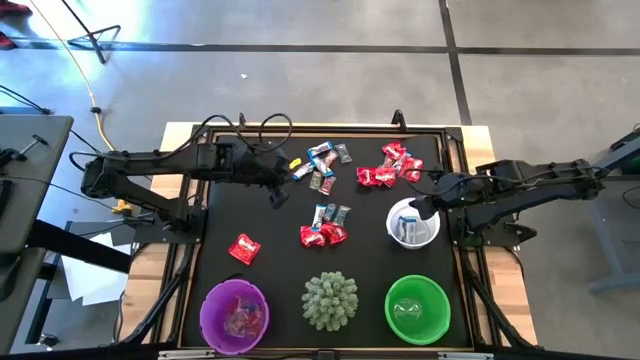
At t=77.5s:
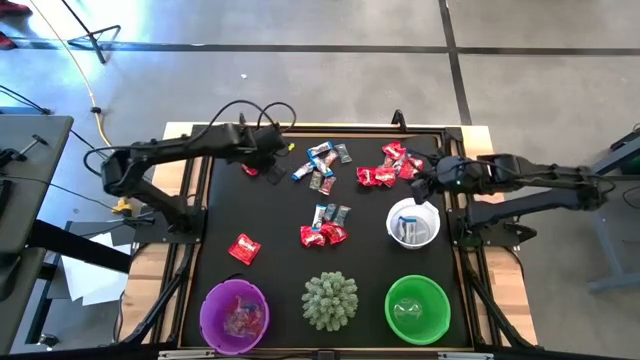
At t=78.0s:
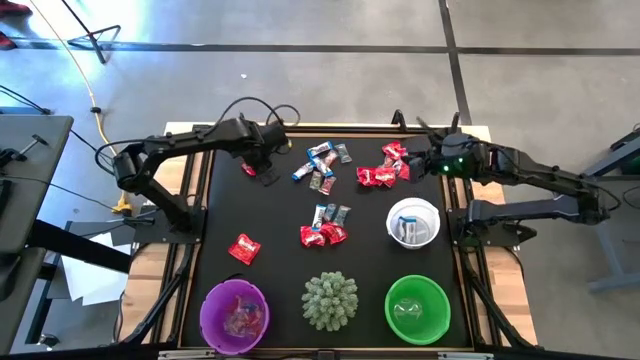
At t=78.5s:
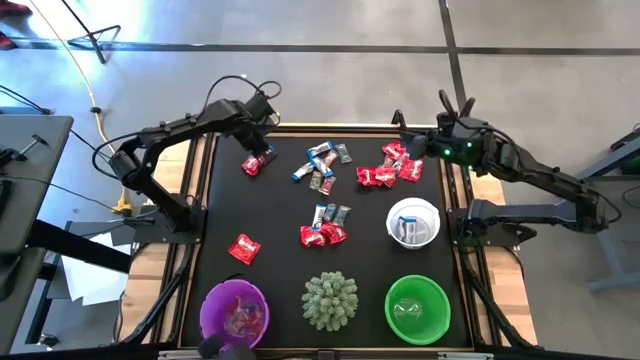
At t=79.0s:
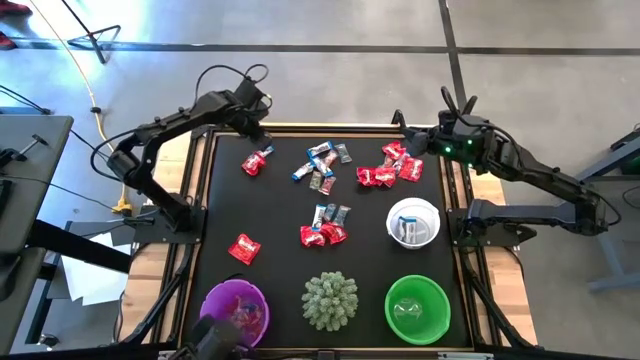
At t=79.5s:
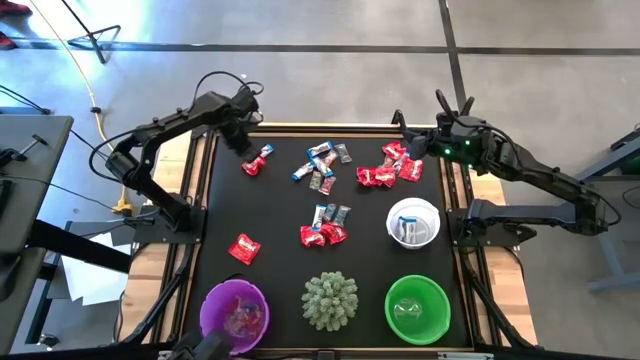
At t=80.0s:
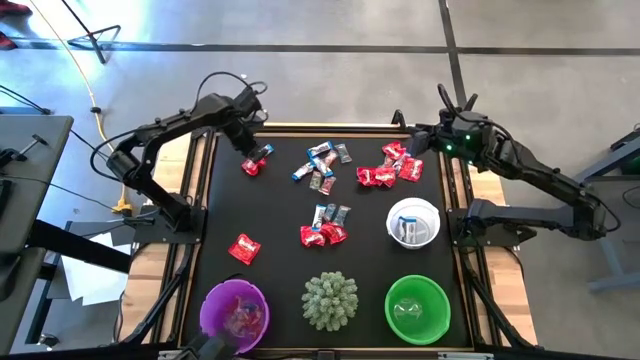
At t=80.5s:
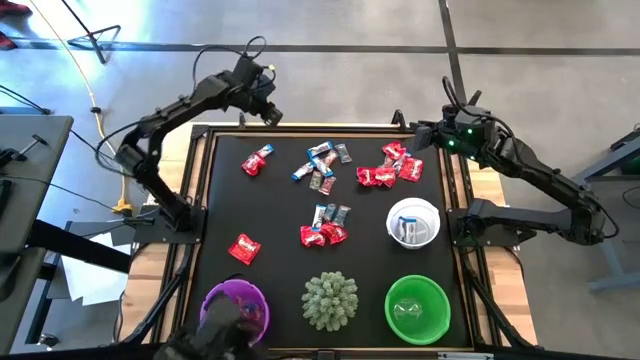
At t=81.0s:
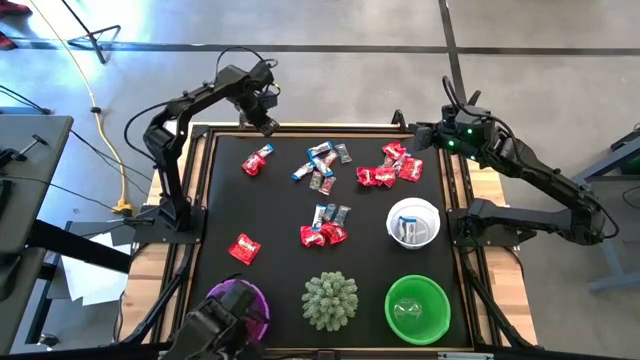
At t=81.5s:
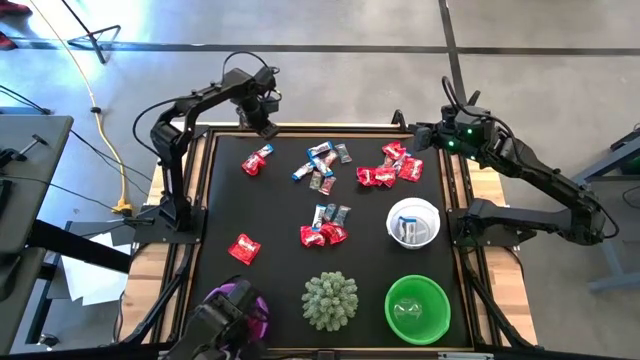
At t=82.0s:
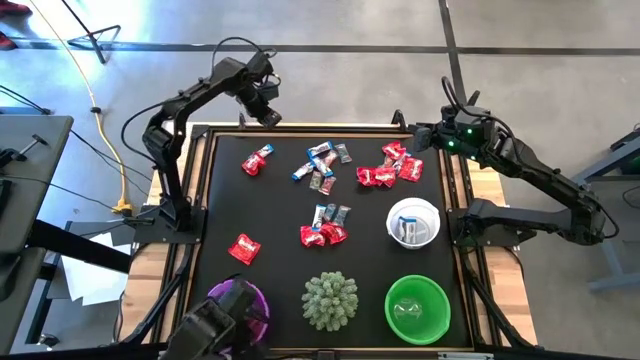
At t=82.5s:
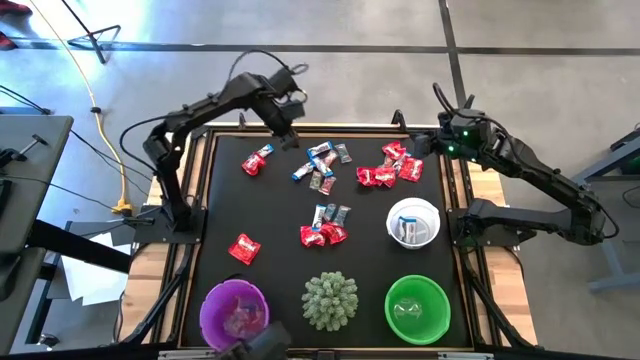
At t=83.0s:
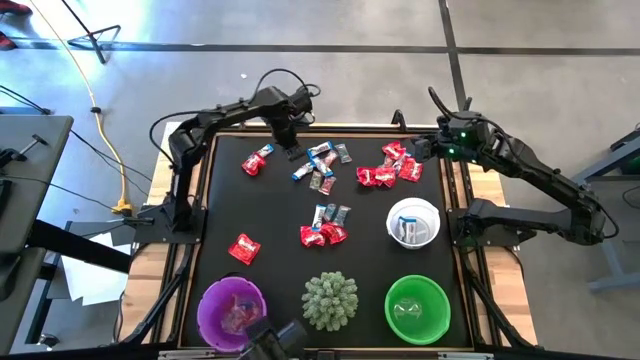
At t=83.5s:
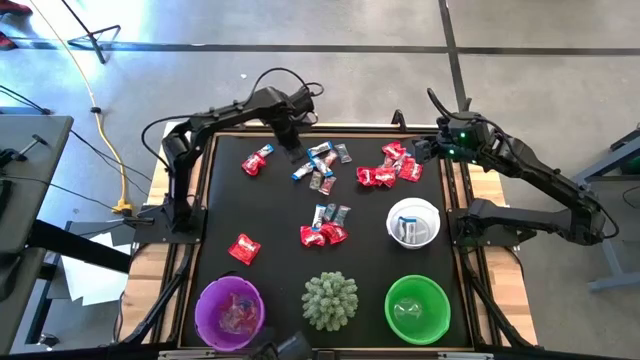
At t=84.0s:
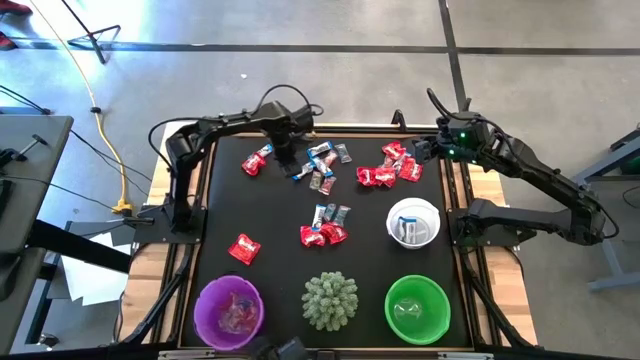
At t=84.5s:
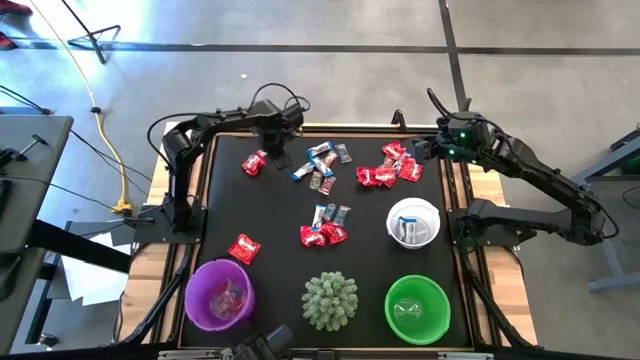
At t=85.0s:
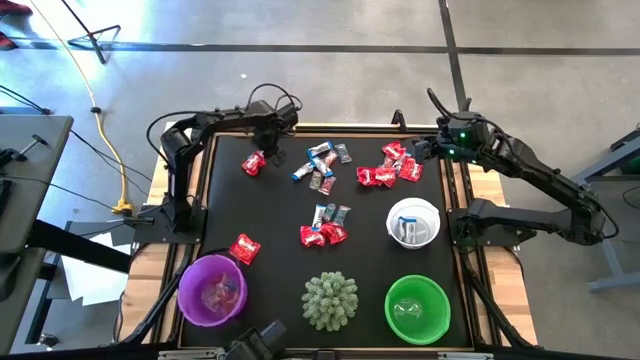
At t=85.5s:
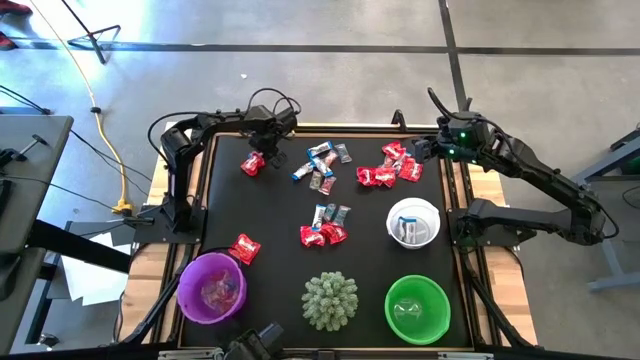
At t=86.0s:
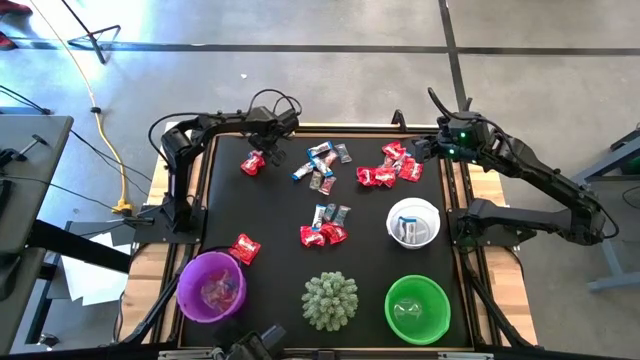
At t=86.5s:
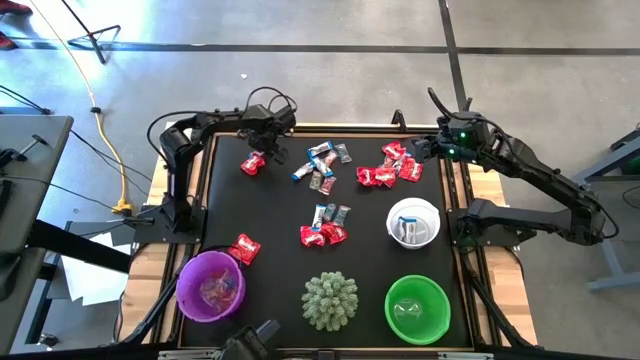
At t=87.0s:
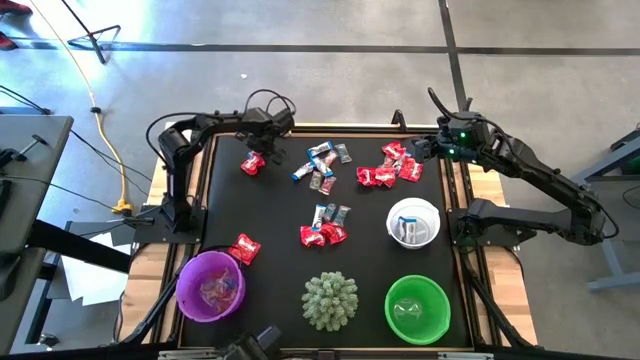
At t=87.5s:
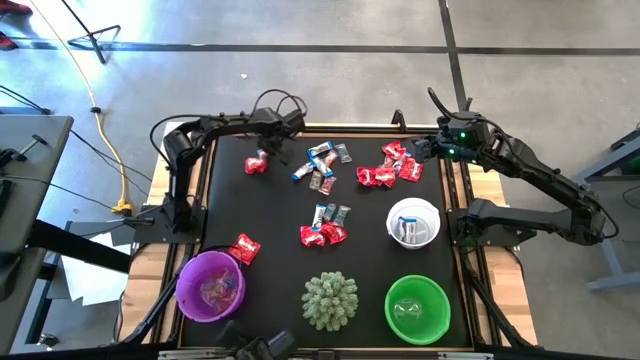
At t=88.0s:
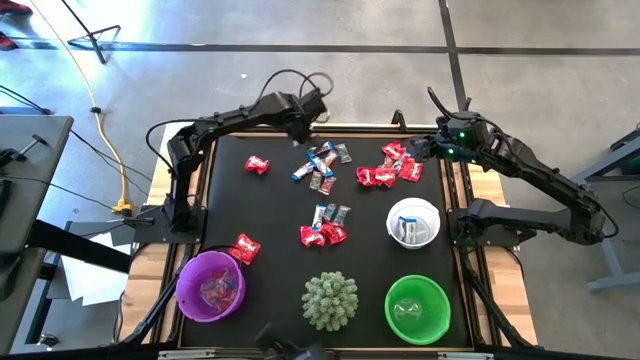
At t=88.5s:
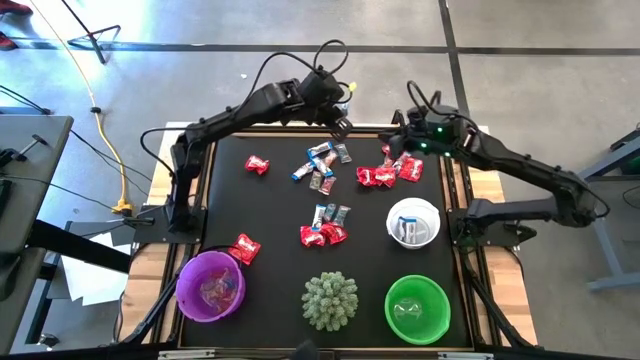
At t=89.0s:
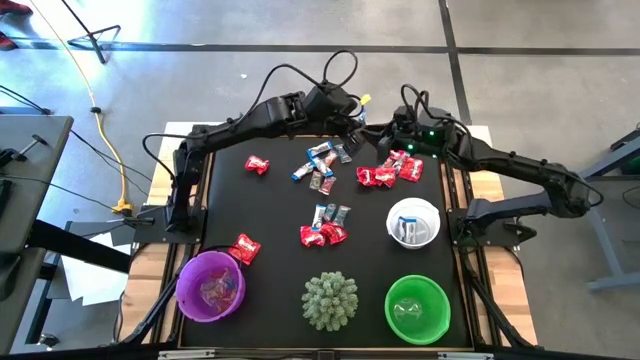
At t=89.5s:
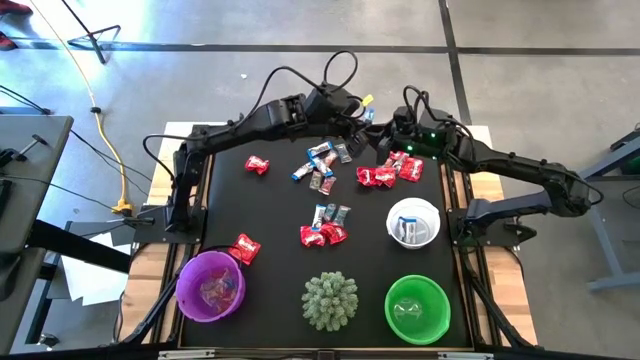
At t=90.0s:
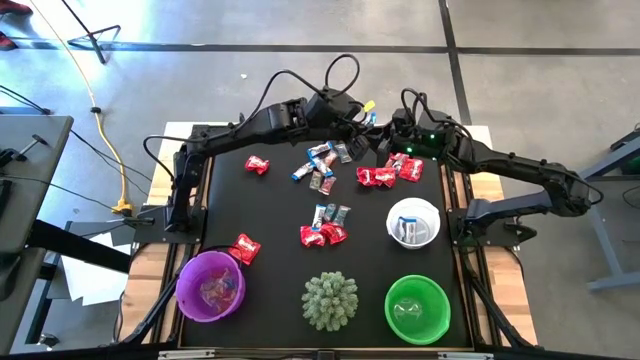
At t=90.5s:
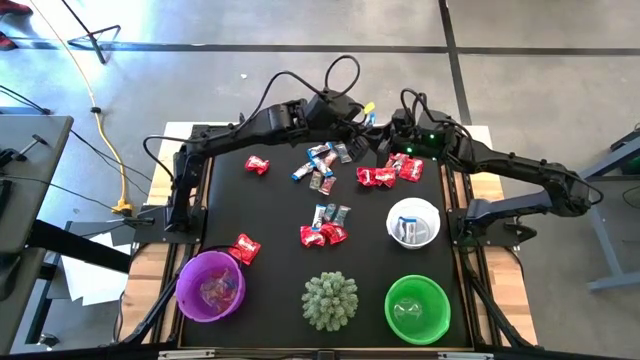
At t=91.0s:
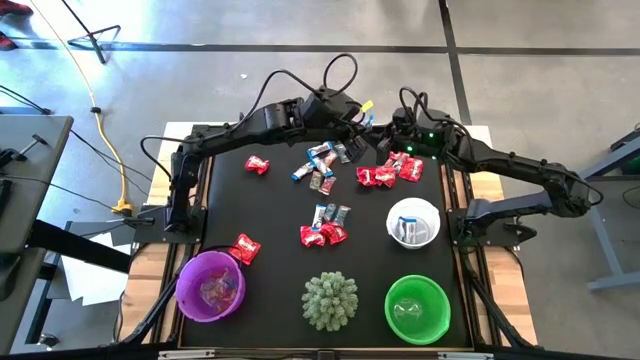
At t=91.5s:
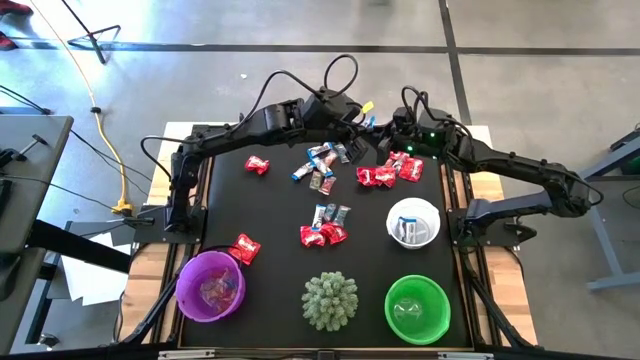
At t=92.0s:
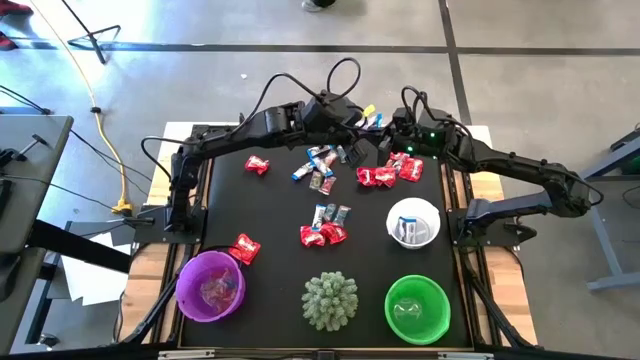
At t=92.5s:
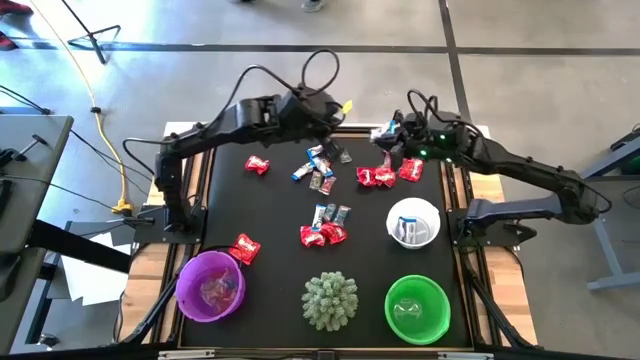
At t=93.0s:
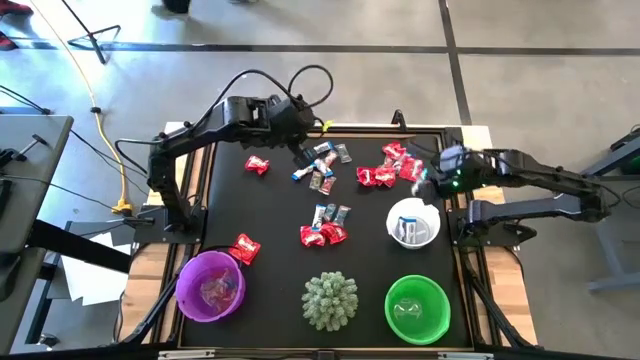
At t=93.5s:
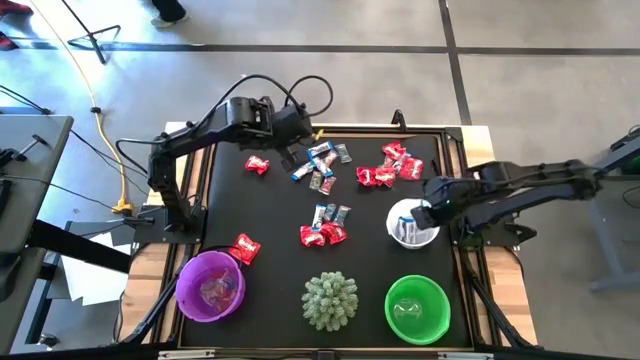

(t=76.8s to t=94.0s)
Task: Sort candy
Put the white candy wrapper into the white bucket

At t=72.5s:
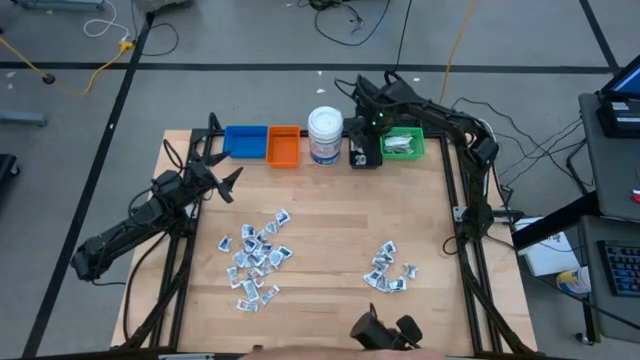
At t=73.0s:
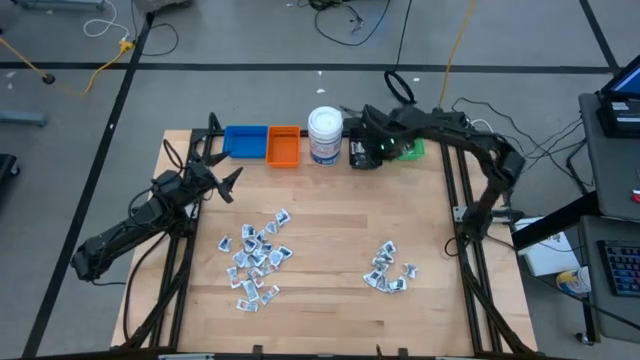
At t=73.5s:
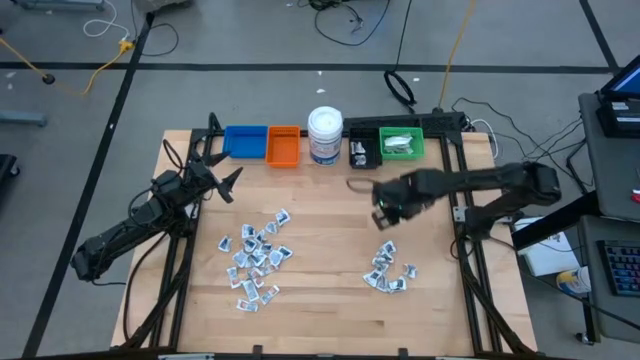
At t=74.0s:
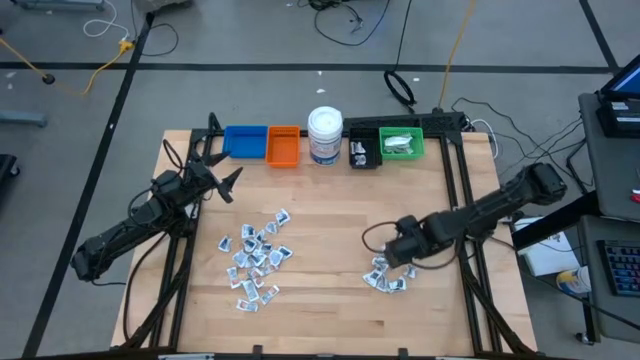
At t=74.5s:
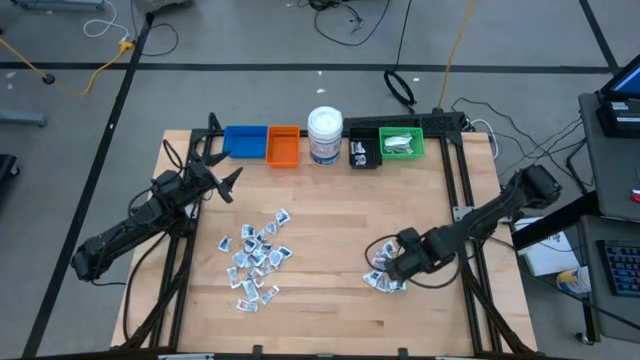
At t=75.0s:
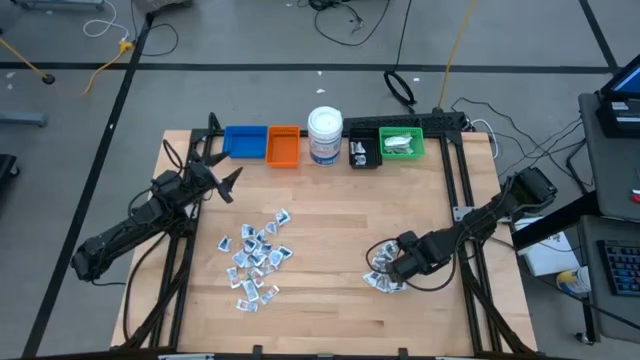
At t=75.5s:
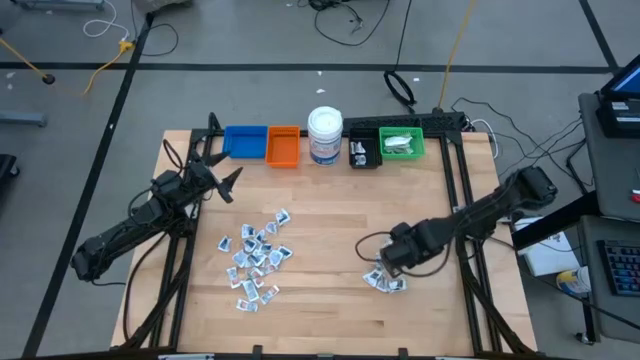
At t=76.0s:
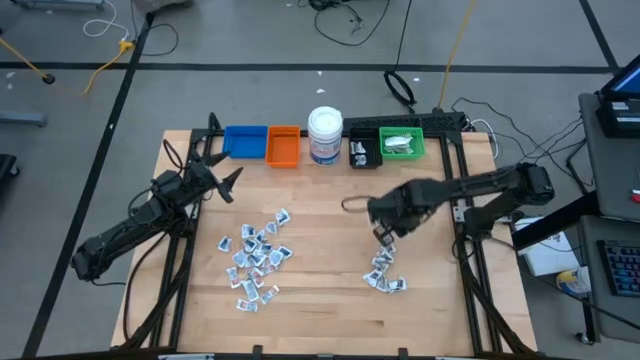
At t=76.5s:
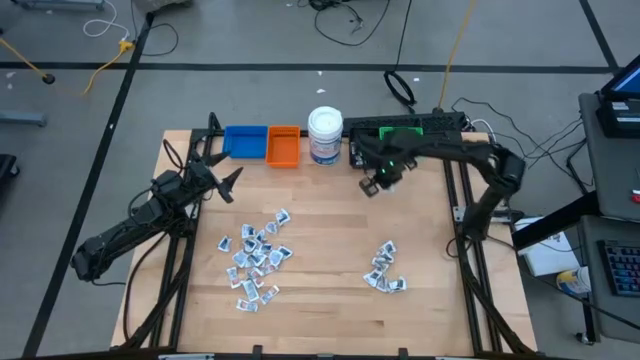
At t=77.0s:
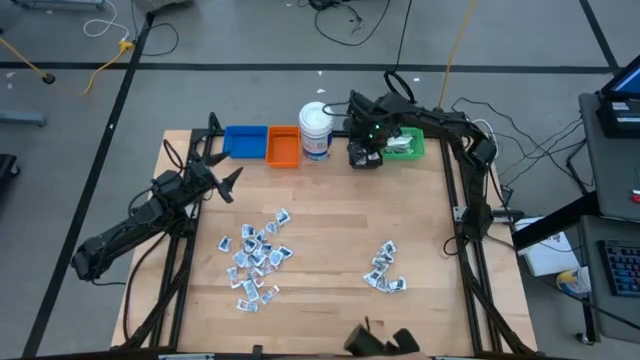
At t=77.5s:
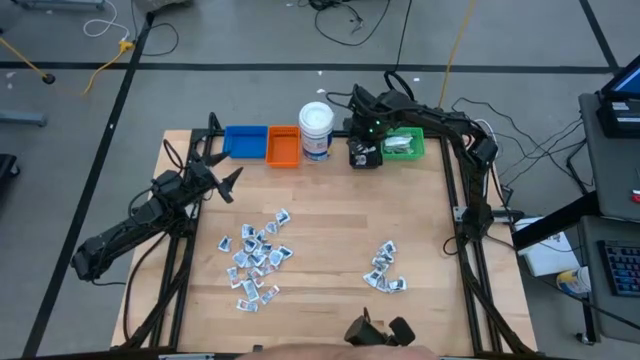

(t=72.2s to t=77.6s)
Task: Pick & Place First Aid Supplies
Put the towelette pack into the black bin
